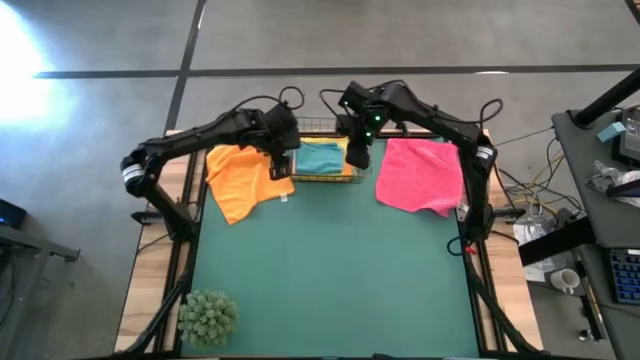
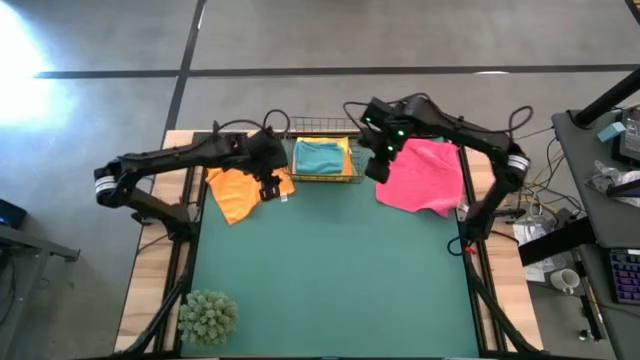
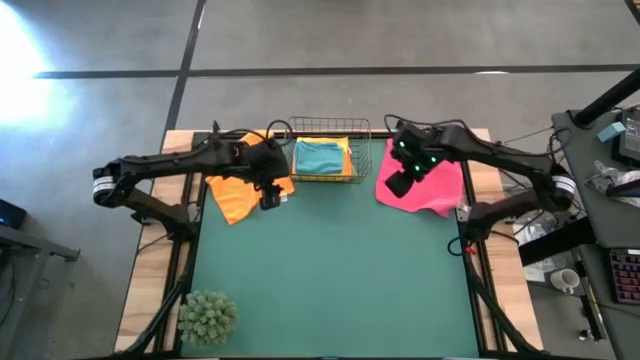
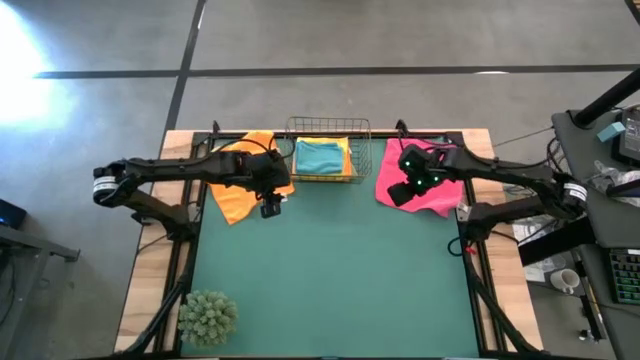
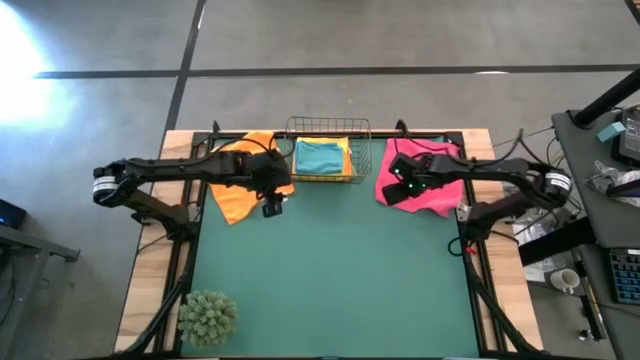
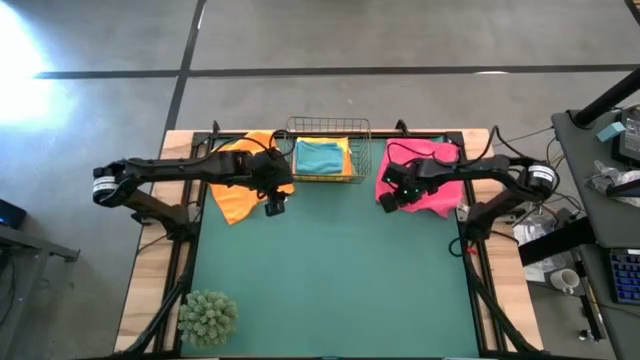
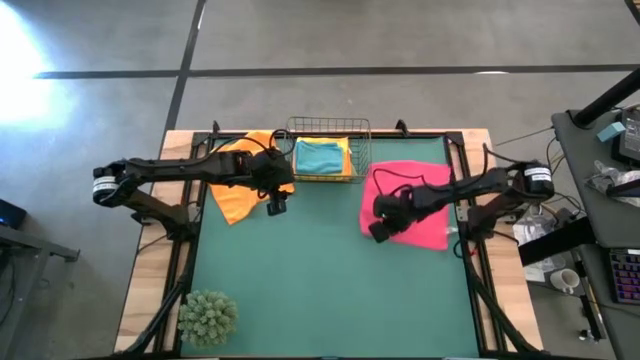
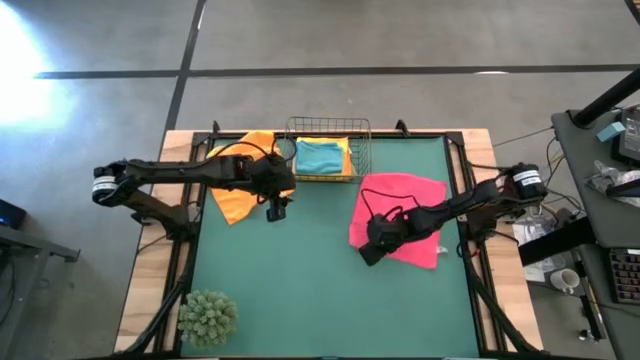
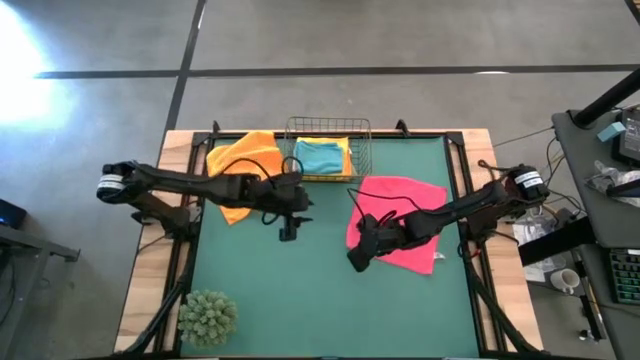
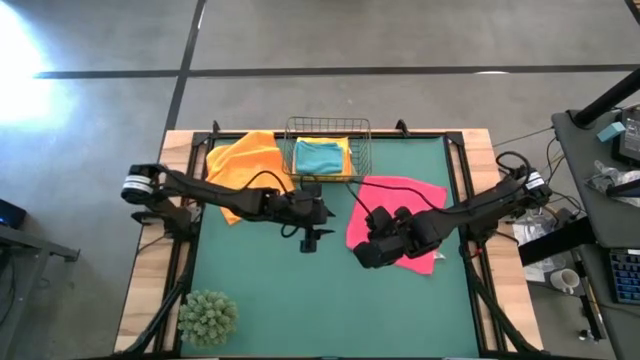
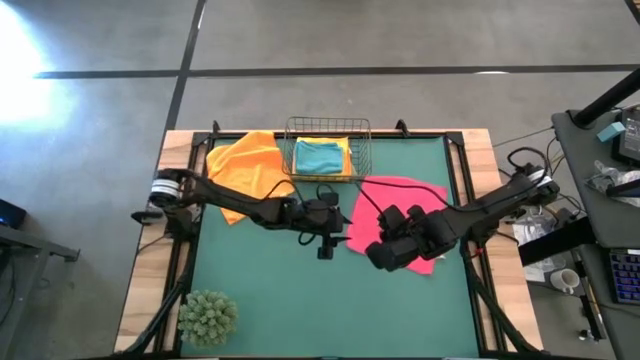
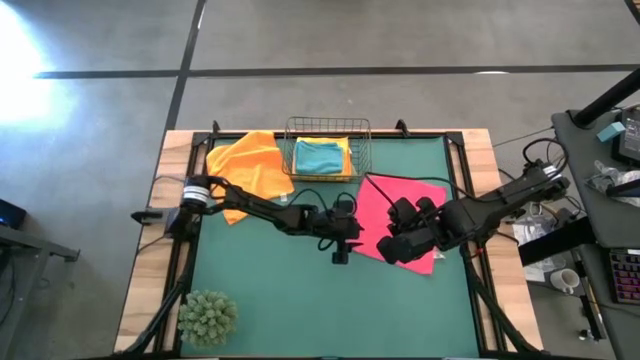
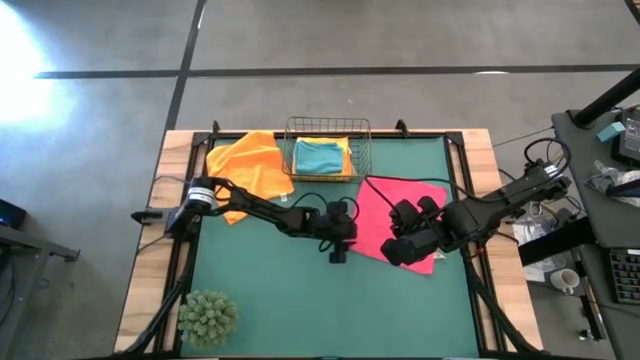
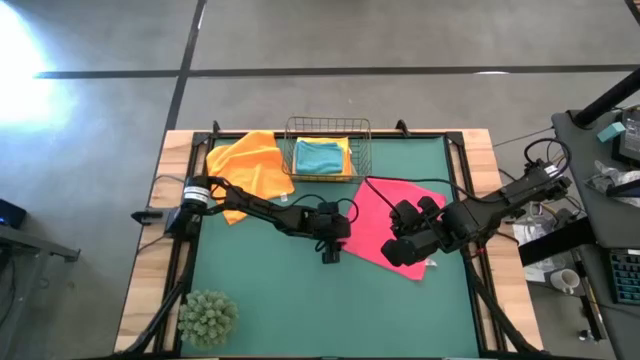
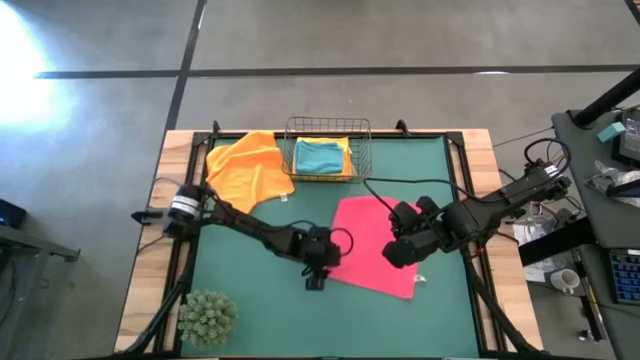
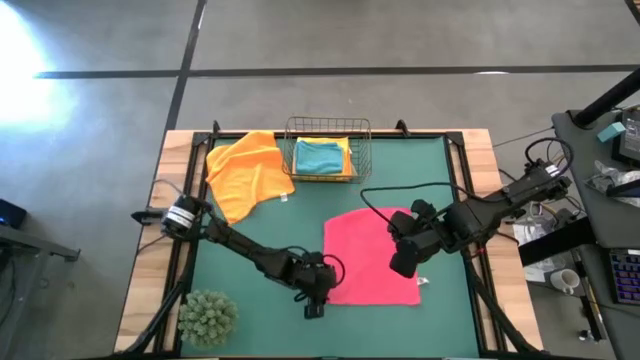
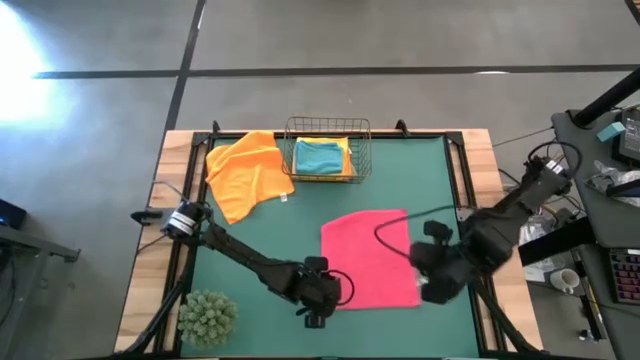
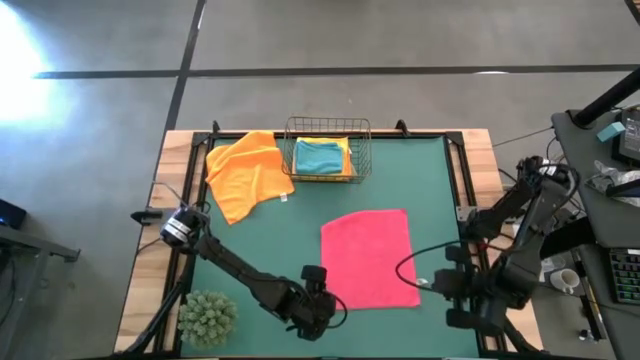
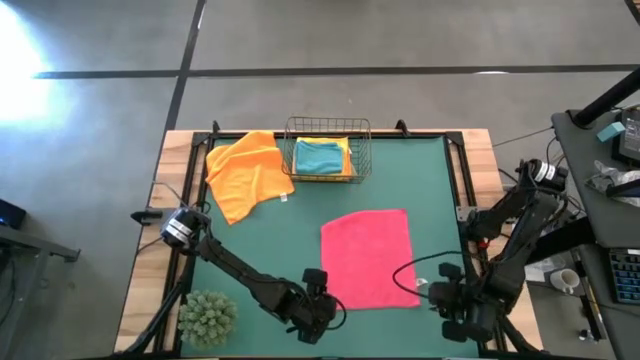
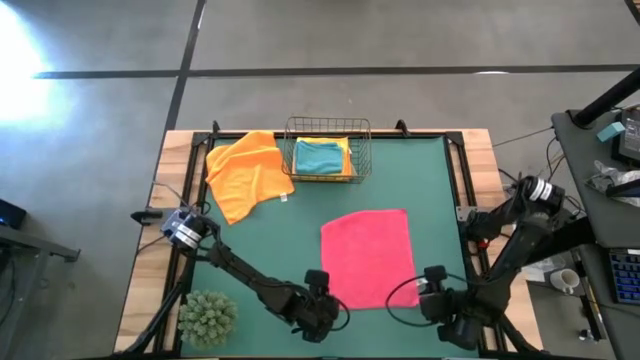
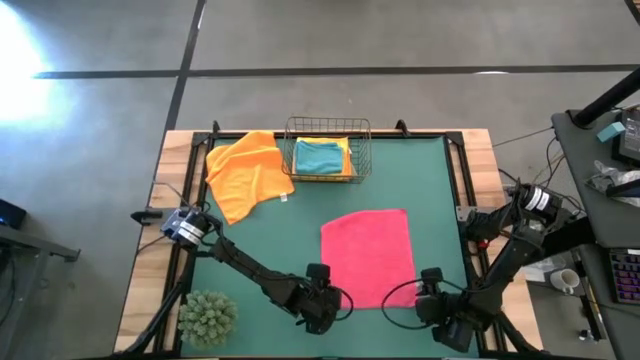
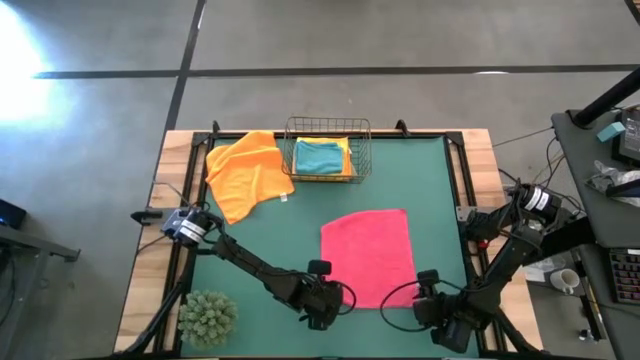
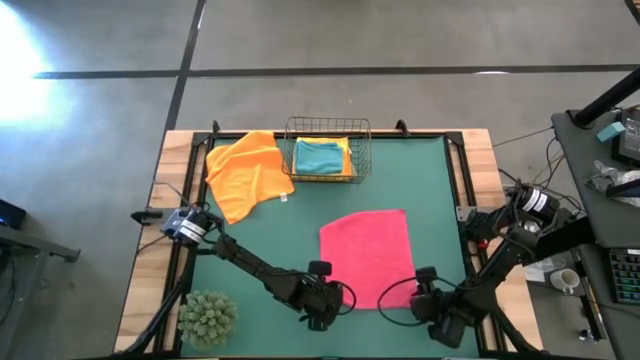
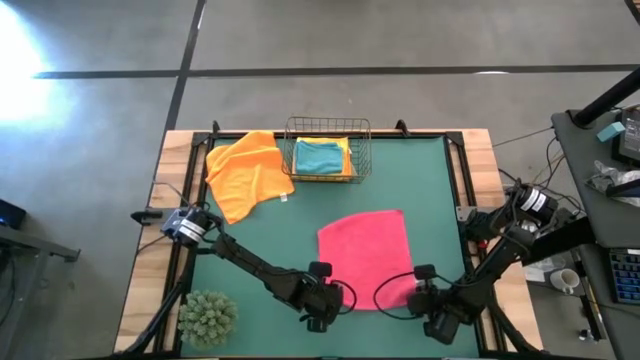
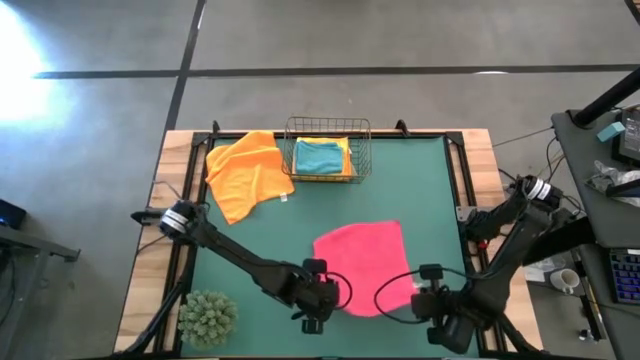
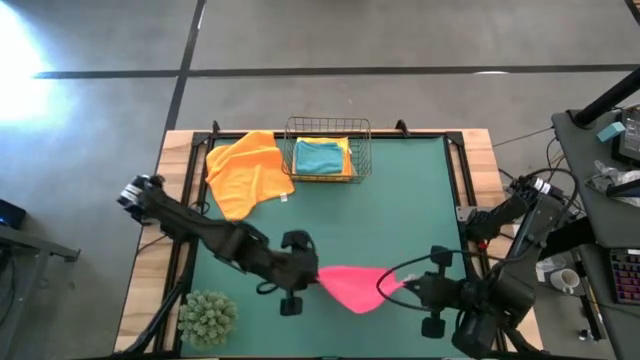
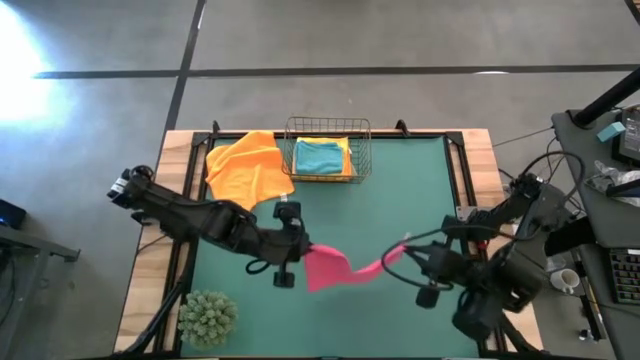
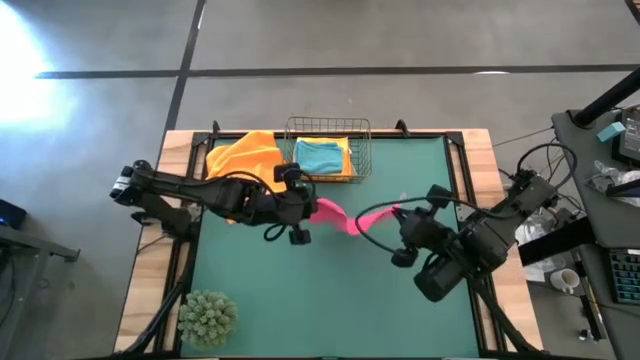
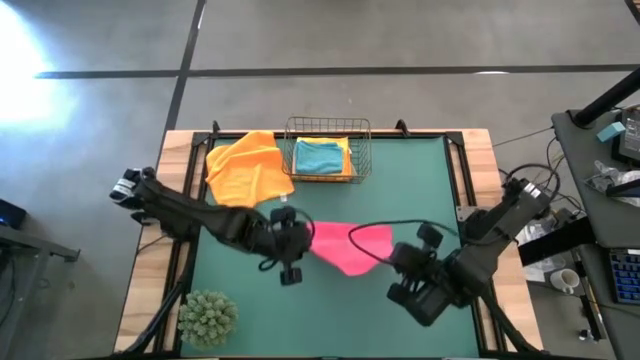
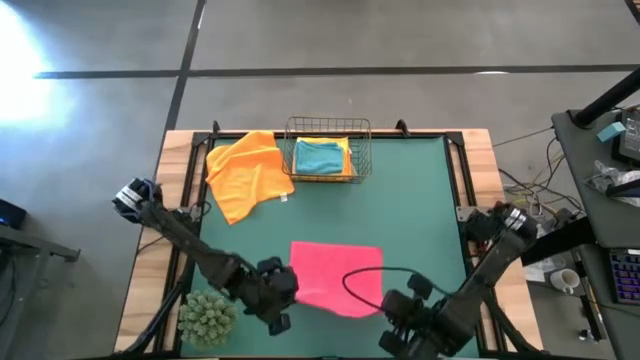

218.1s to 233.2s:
Task: Fold microfiber towels
Fold the pink microfiber cloth
